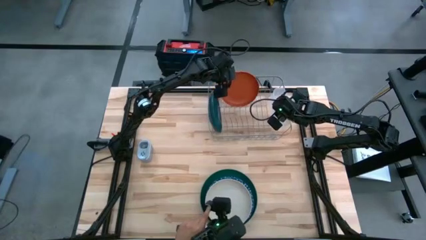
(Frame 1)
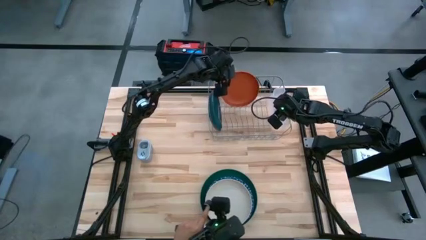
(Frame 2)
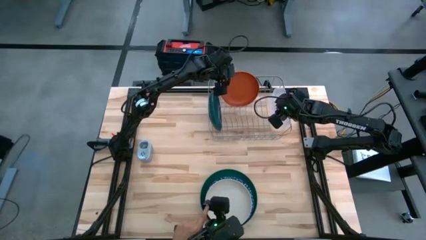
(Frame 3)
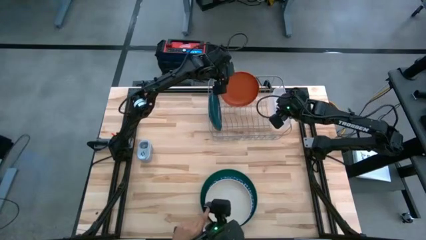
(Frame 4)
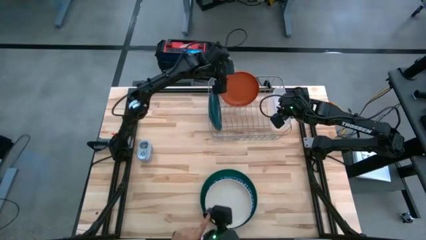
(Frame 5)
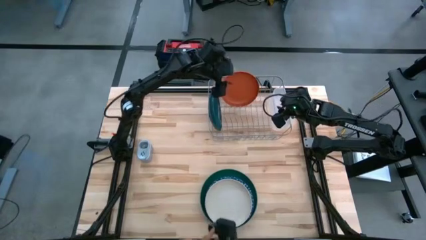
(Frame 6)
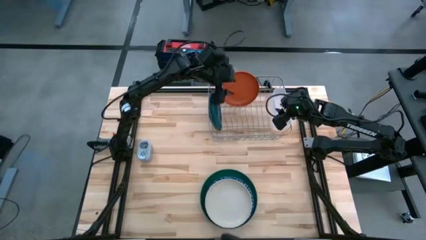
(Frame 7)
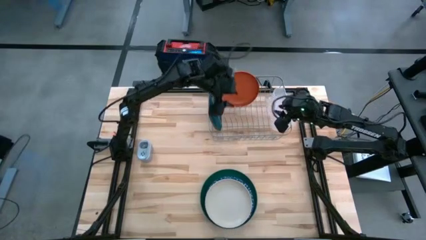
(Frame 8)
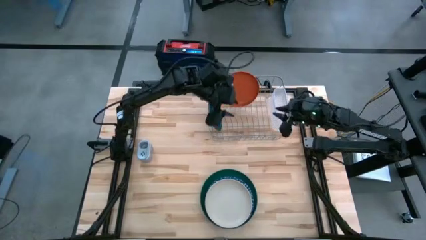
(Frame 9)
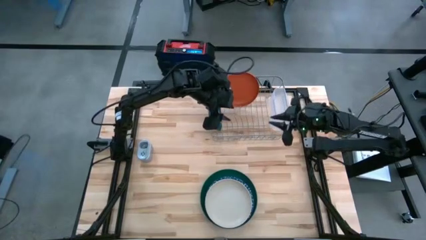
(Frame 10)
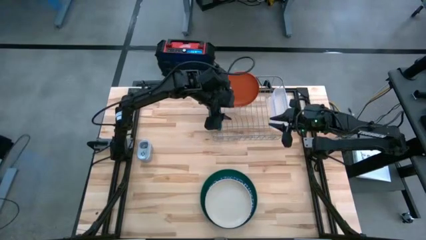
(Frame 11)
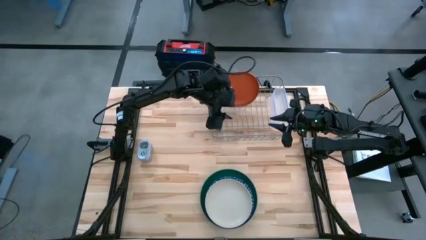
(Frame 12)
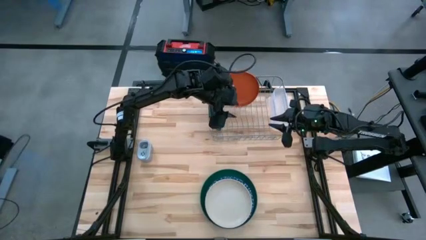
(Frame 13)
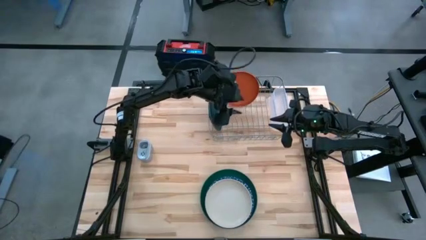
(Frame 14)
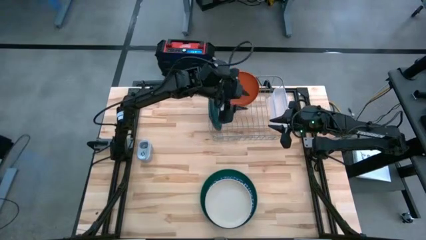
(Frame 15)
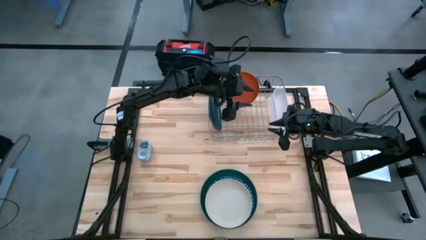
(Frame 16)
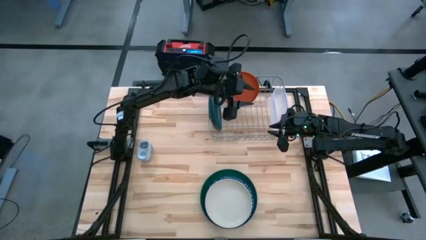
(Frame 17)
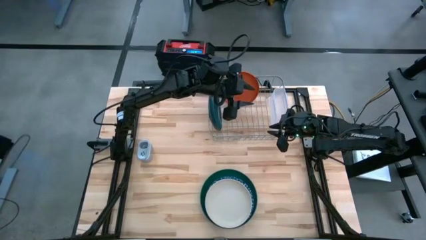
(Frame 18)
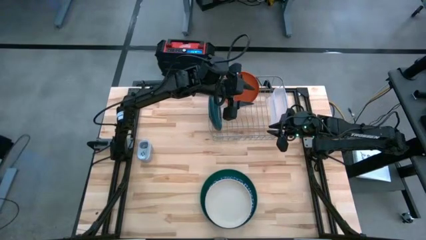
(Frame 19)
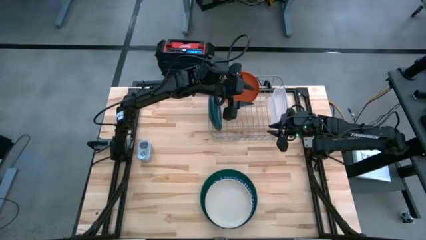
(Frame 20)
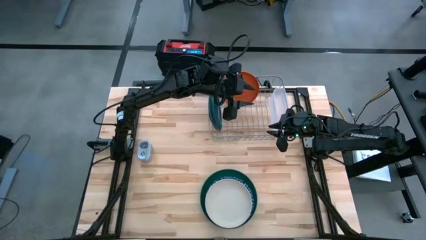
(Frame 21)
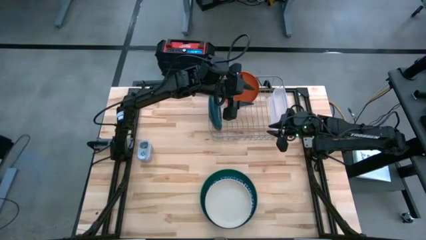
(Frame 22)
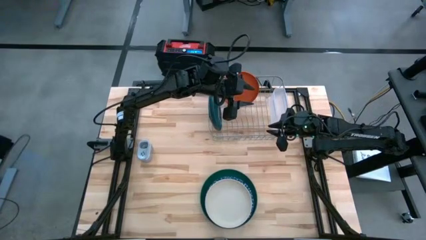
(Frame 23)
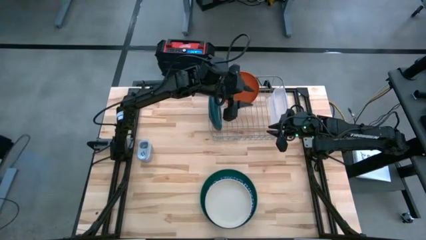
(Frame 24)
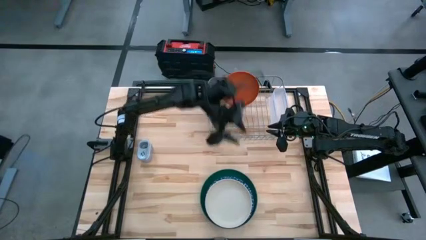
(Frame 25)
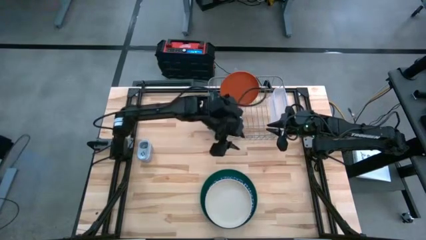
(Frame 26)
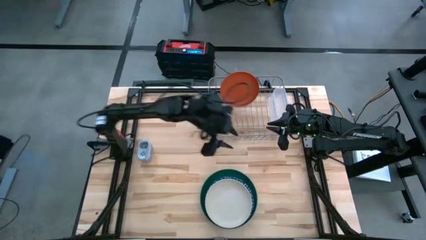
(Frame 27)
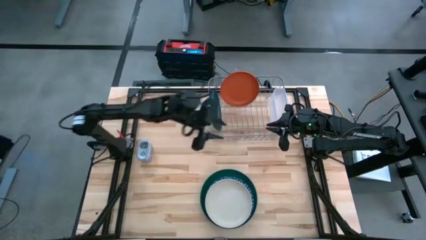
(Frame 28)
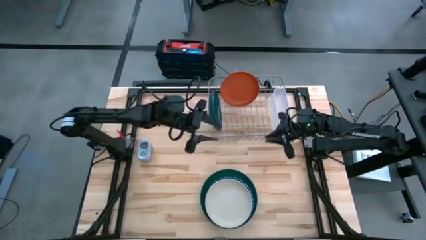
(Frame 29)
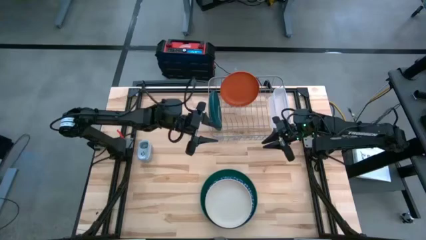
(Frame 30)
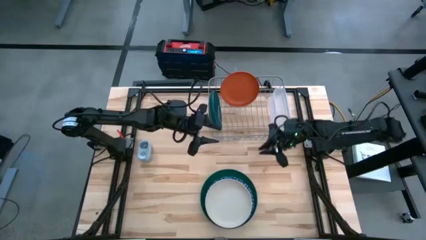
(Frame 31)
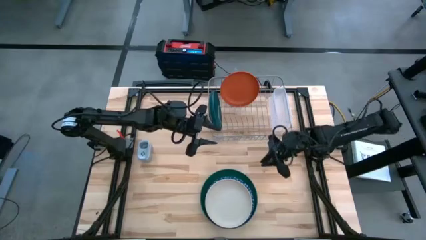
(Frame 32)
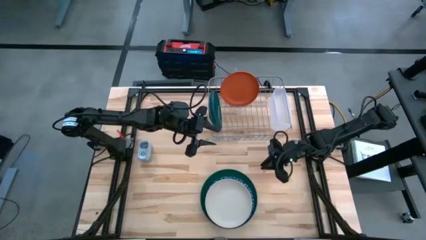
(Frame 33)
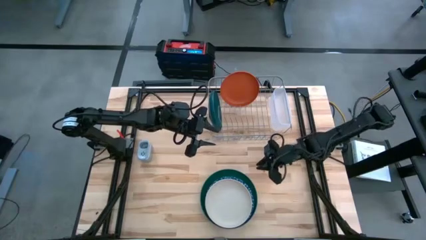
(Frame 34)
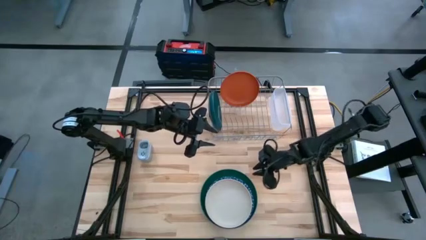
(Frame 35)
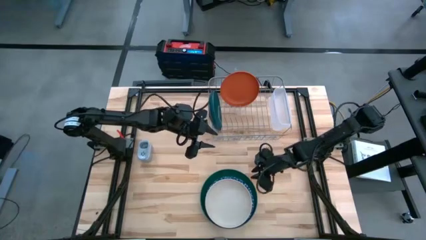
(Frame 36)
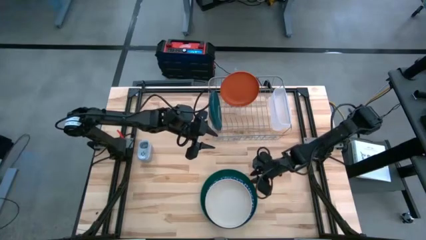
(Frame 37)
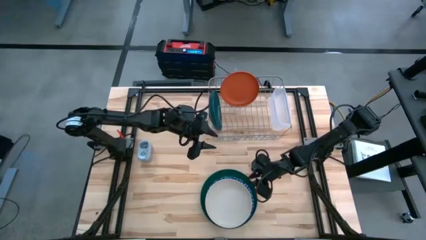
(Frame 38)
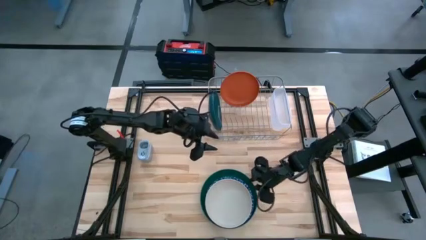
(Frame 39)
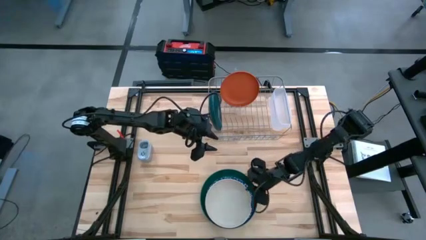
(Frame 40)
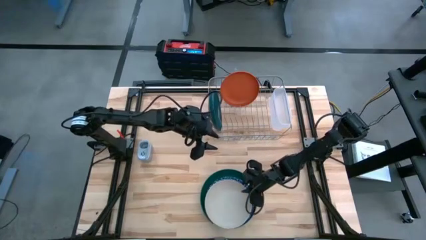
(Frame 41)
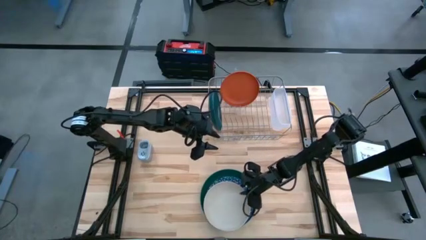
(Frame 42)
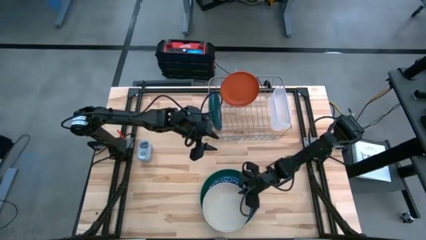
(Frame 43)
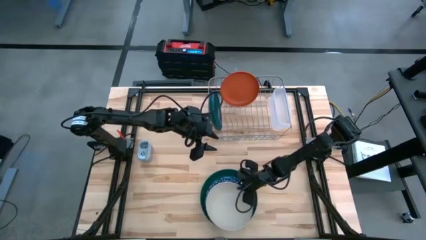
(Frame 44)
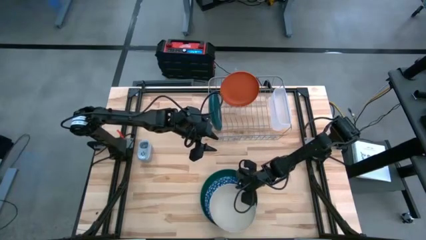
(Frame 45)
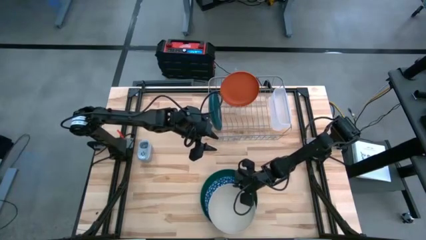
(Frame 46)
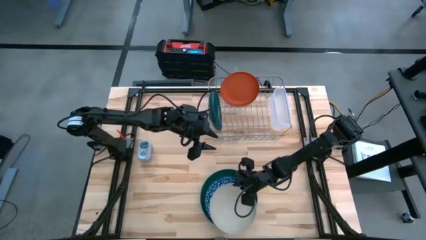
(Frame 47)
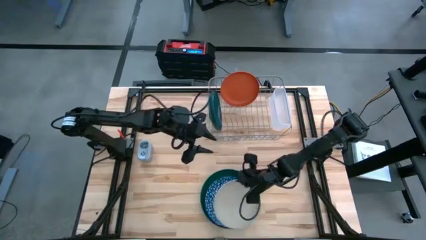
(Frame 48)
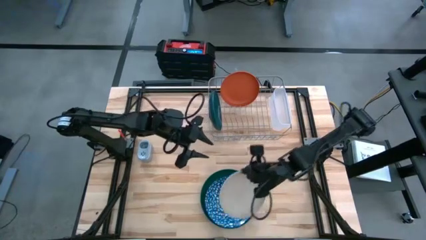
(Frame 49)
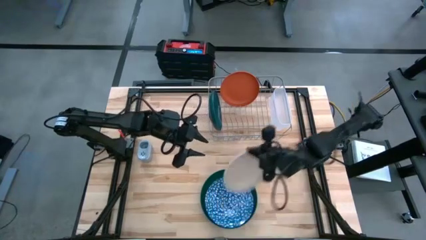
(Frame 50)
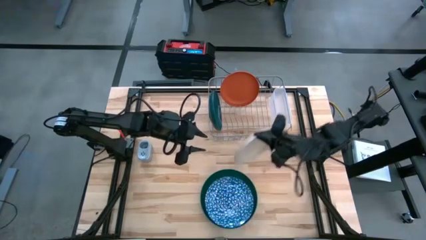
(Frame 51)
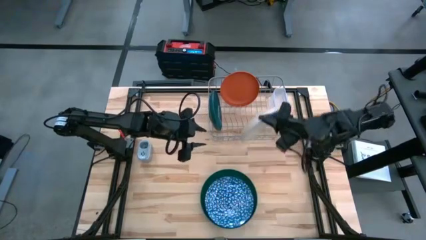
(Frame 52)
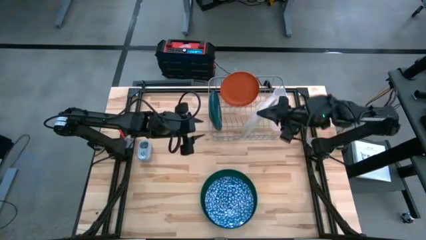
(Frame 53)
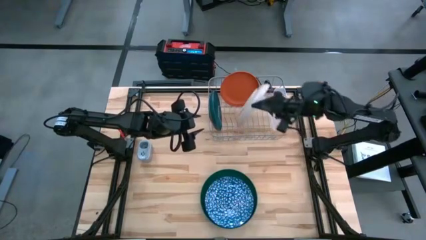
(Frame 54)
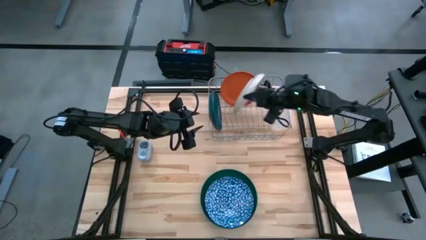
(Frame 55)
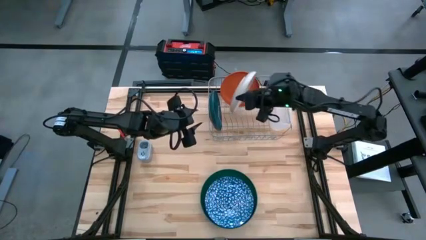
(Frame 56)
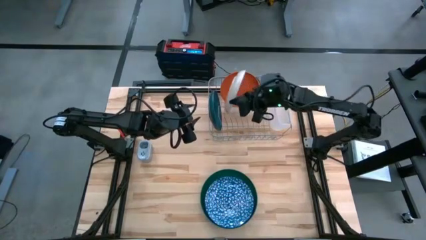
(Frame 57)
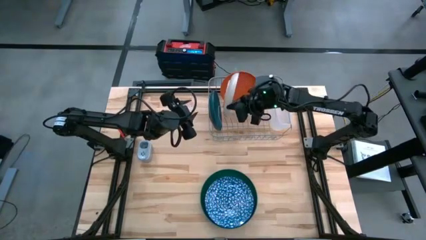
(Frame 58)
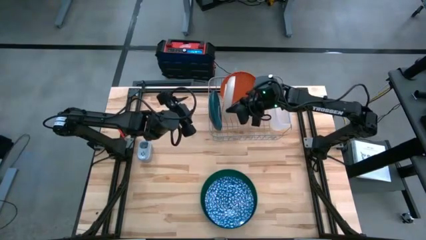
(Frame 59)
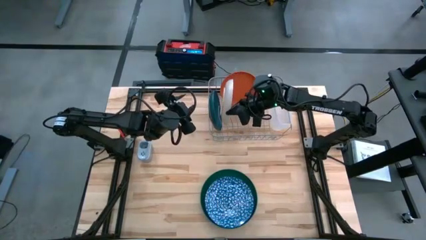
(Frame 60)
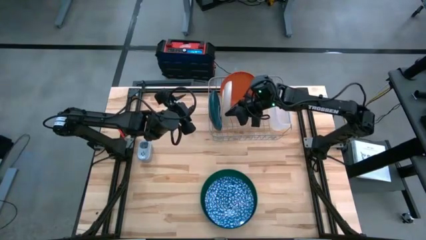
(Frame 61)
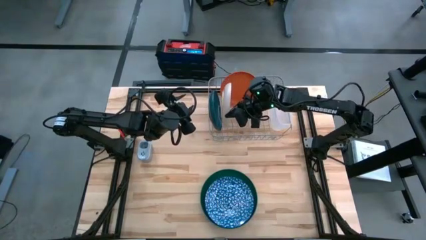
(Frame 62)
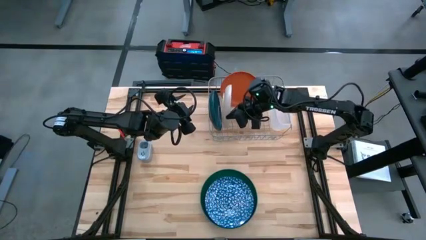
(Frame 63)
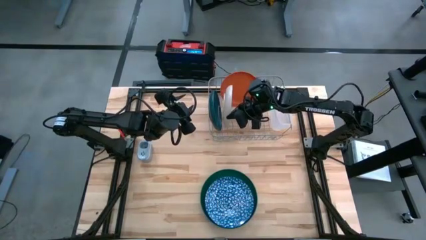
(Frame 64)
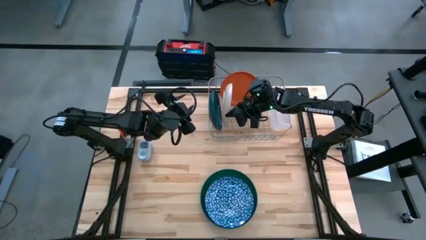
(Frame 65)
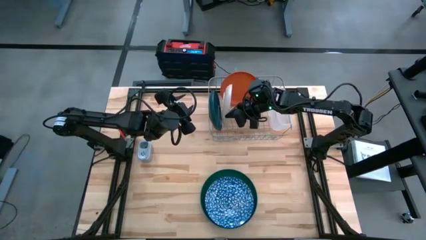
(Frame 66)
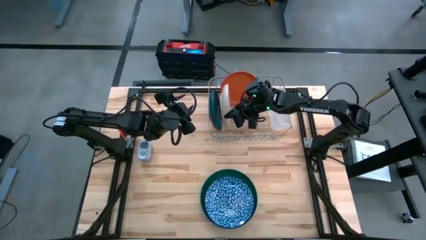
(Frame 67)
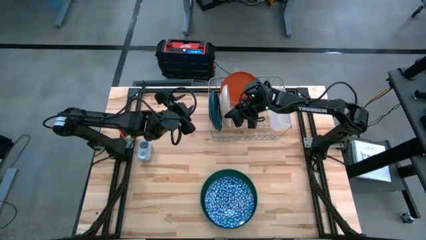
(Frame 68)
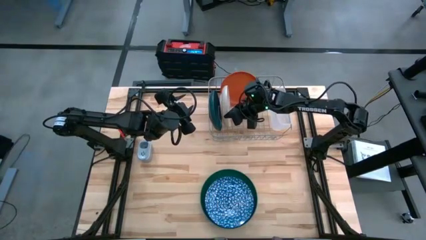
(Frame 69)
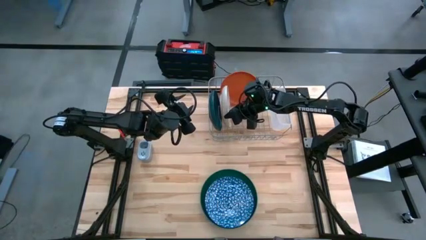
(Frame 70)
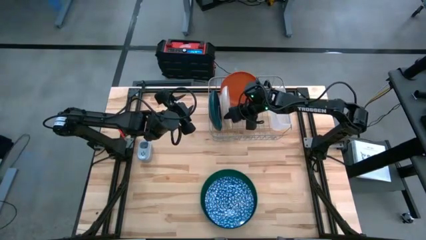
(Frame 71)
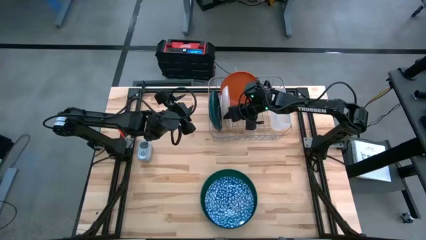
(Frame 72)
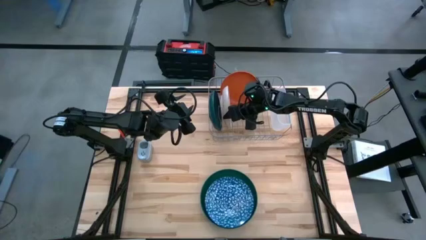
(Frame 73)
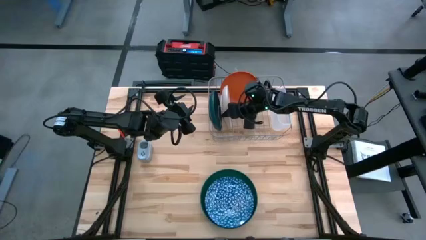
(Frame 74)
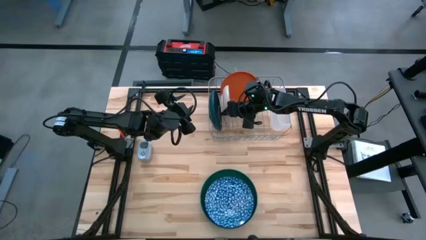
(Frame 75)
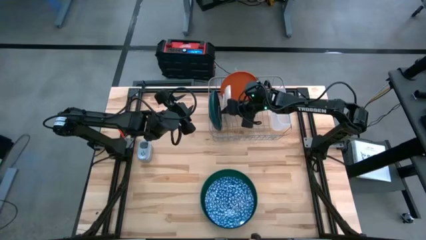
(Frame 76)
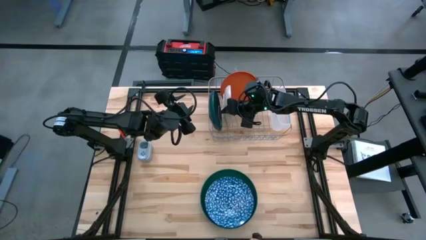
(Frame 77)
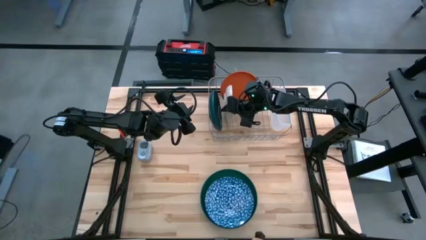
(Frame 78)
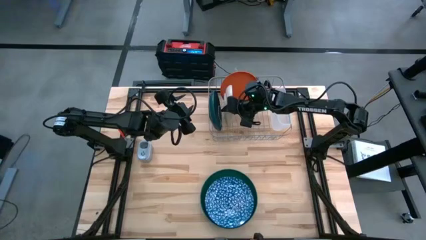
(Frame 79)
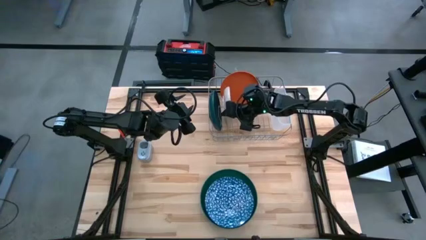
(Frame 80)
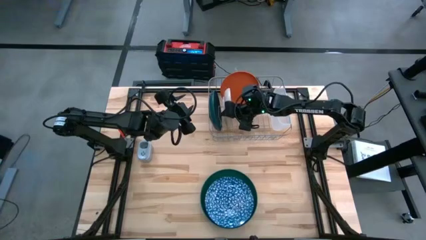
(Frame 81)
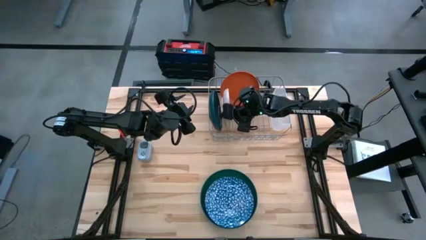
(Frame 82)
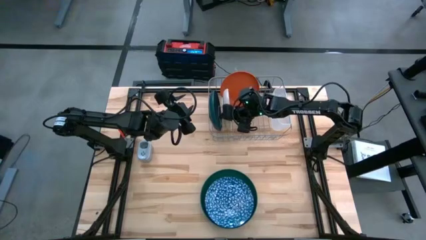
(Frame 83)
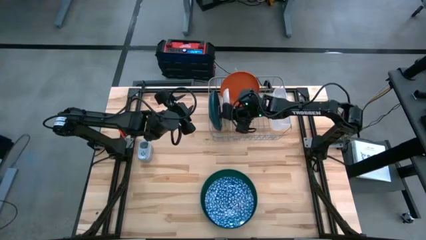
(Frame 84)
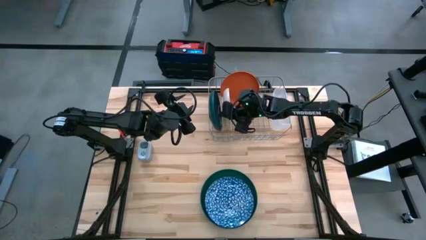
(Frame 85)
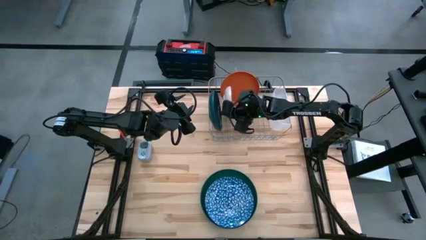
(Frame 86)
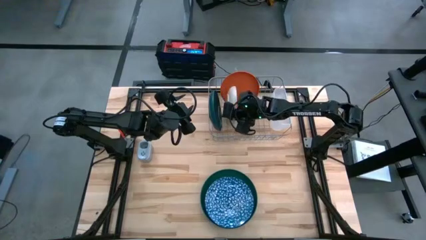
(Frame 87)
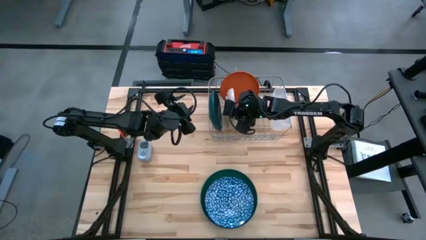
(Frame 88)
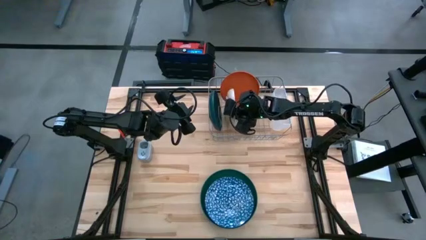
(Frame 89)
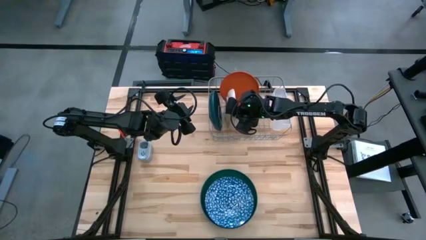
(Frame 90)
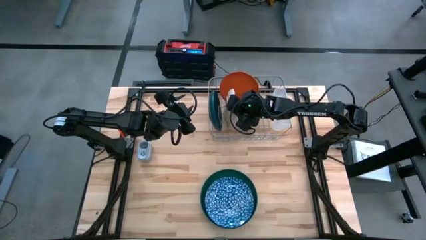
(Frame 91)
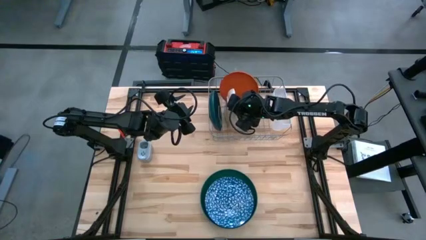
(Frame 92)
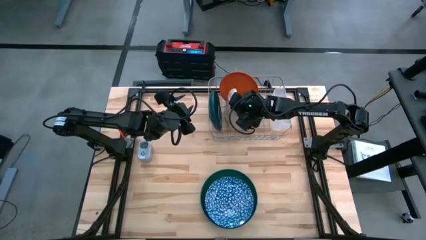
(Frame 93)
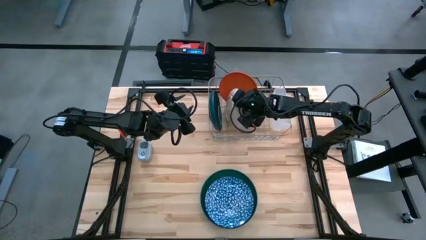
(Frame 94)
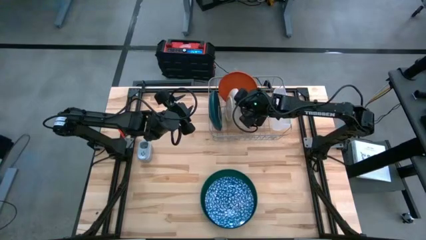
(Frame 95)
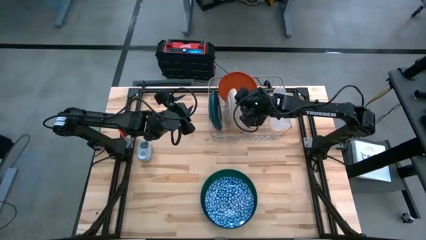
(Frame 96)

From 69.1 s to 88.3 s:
Task: Sort dishes
Put the white plate in the dish rack
